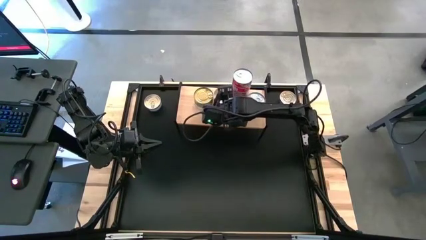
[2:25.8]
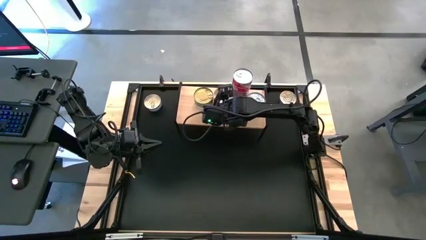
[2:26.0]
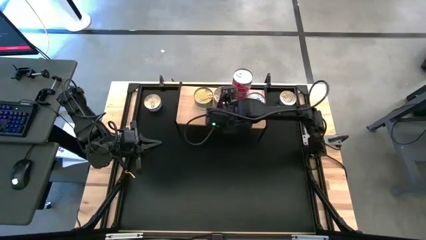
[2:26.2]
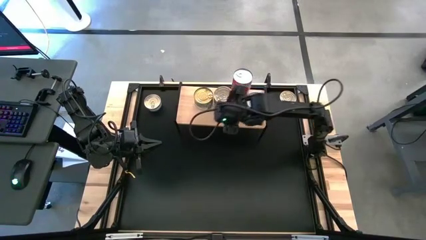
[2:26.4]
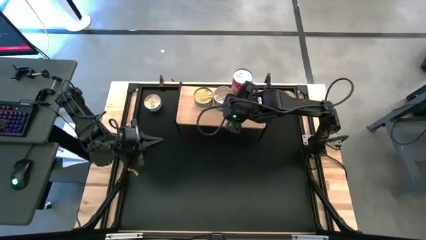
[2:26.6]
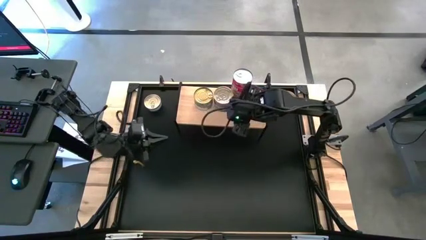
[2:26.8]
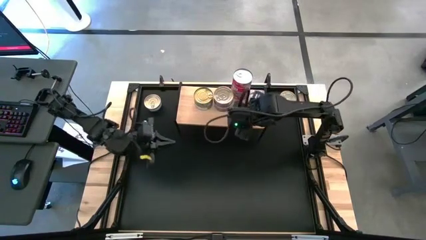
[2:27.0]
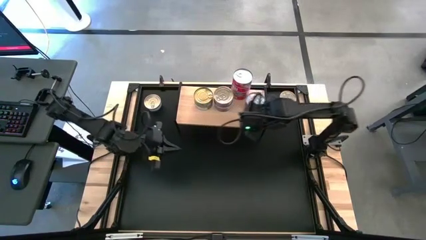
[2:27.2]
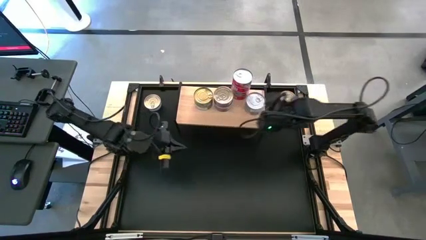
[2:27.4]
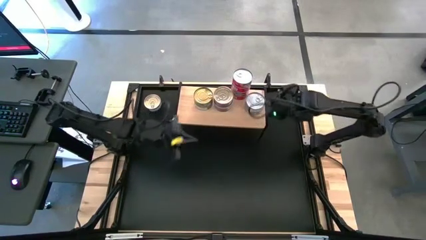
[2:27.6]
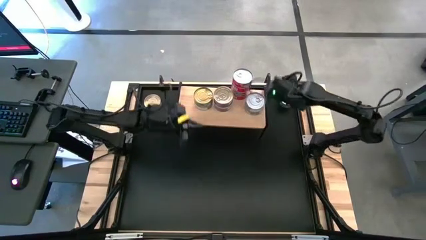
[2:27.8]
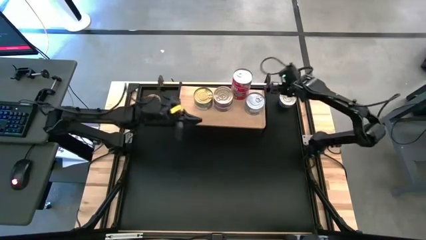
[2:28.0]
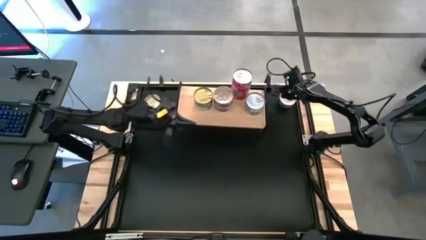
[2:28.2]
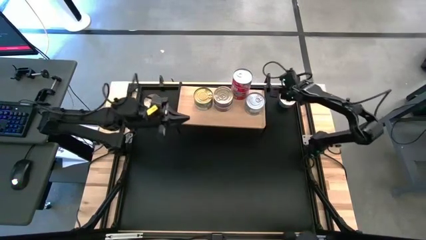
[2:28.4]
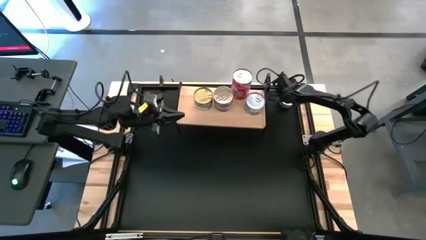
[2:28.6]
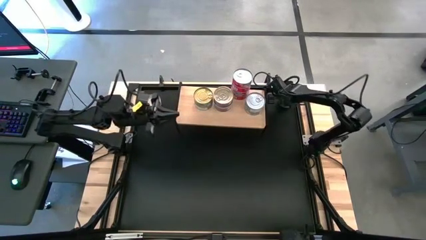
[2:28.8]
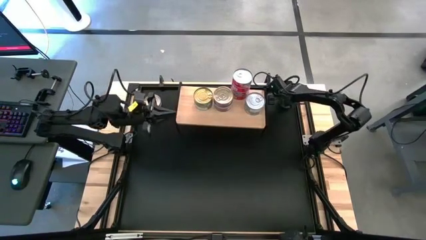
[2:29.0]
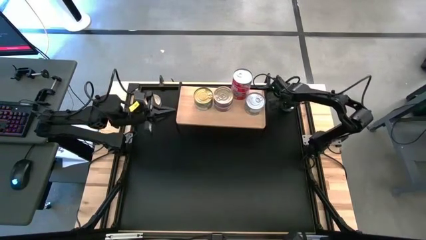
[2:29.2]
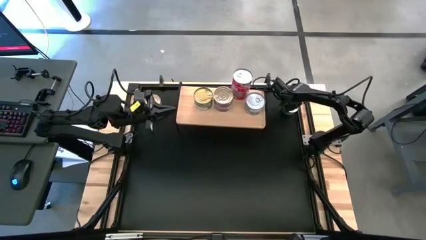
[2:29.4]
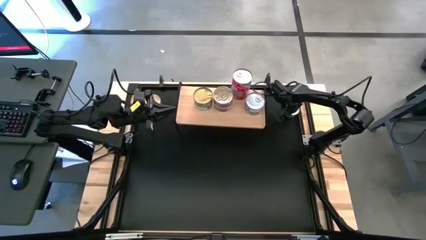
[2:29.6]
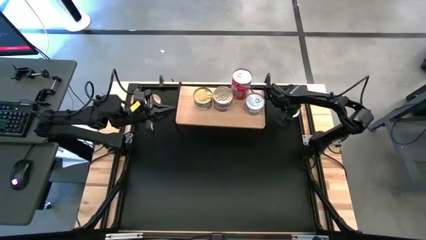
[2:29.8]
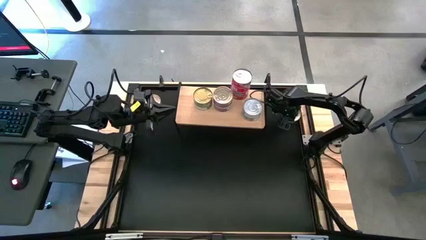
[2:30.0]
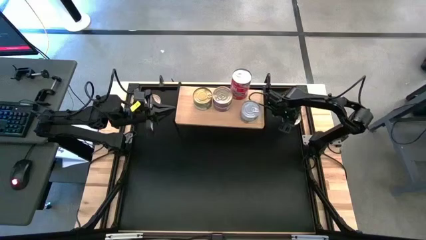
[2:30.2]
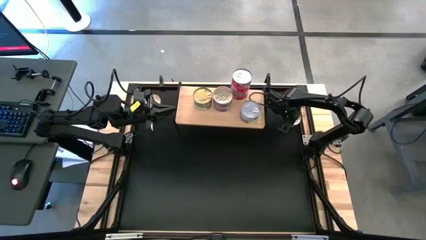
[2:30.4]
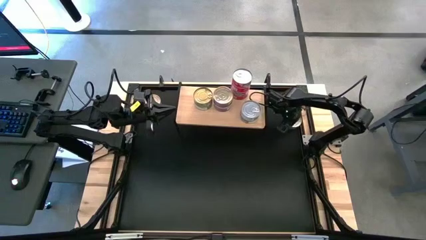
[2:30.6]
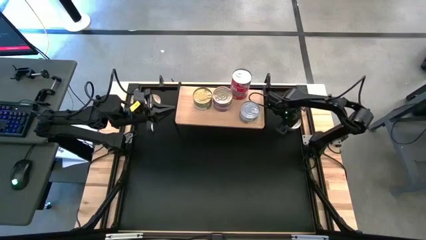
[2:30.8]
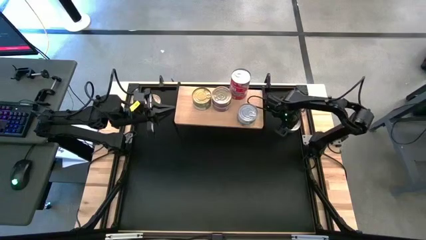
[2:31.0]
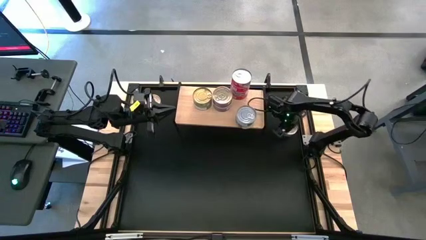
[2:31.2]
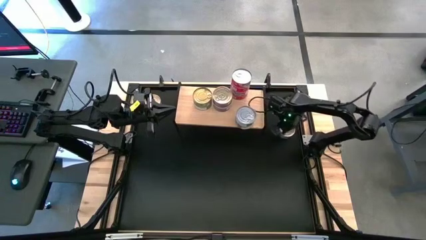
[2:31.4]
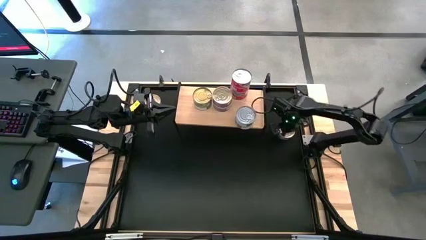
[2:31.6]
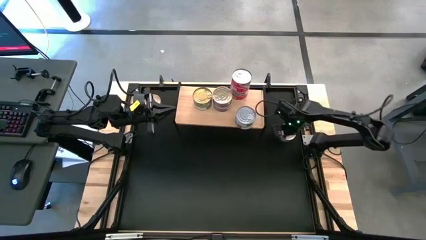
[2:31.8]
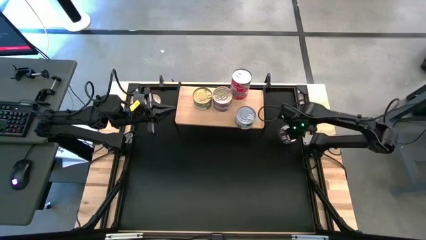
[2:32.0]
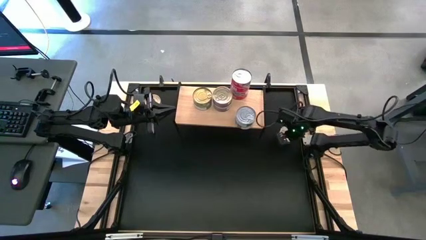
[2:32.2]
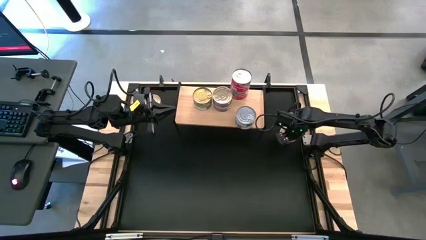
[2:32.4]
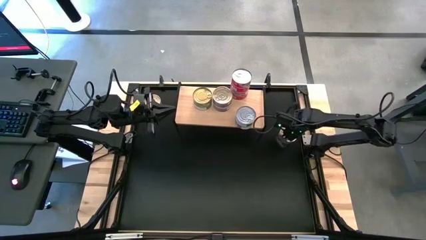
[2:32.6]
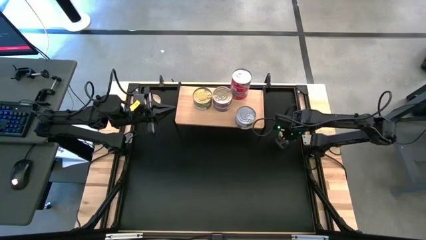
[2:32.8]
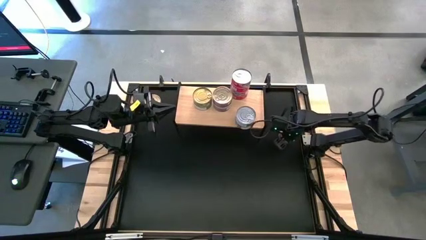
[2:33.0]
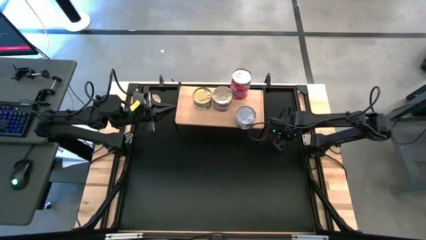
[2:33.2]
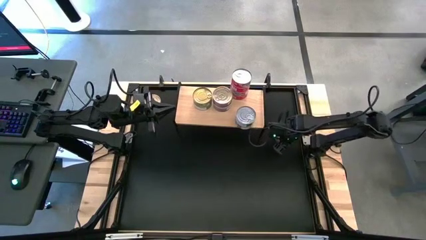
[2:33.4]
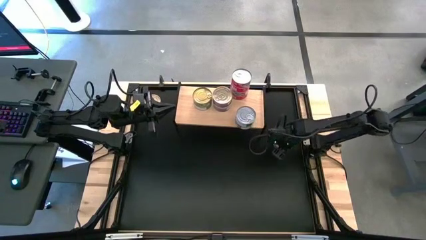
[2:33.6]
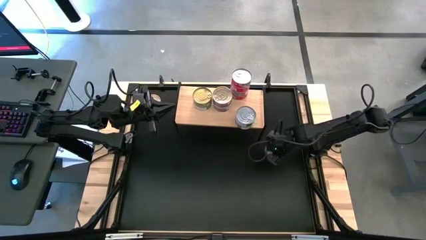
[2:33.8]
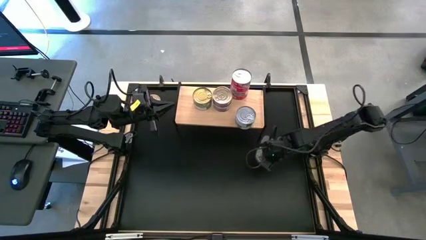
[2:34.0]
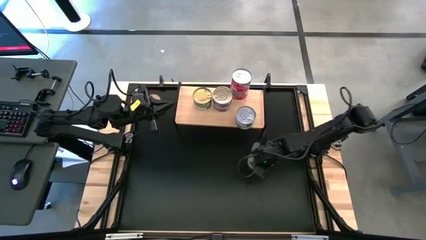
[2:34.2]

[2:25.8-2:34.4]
Task: Stack canned seafood by type on shelf
Move the blue tuna can to the middle right of the table

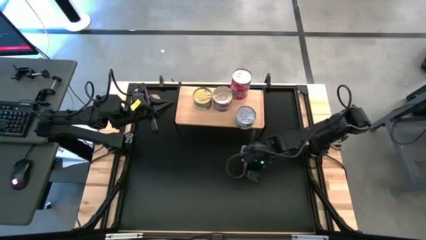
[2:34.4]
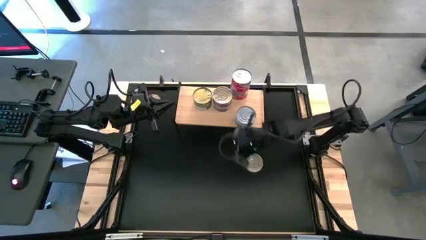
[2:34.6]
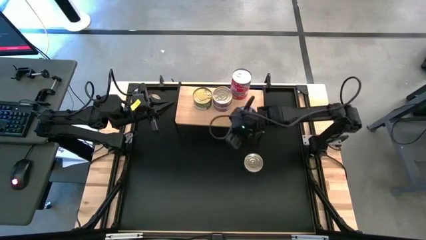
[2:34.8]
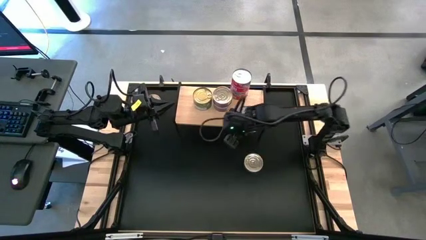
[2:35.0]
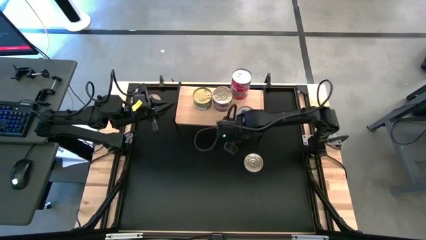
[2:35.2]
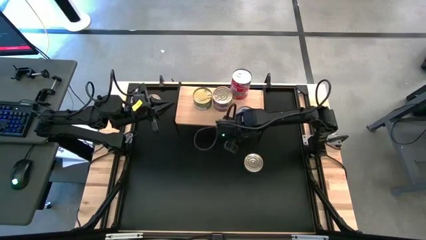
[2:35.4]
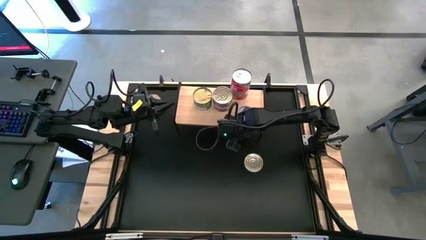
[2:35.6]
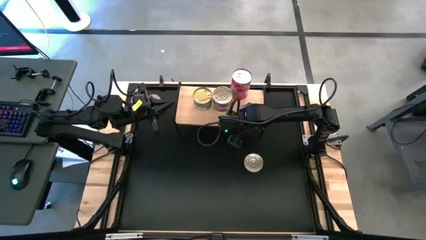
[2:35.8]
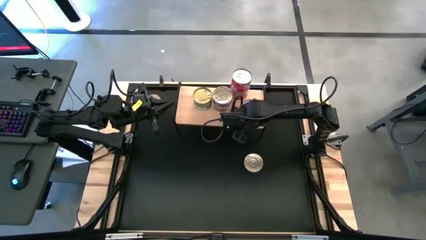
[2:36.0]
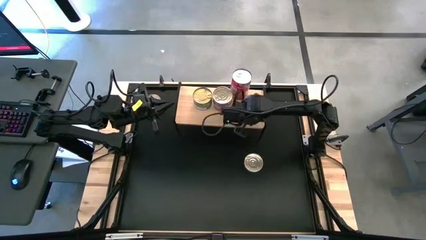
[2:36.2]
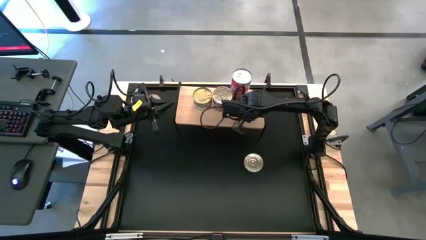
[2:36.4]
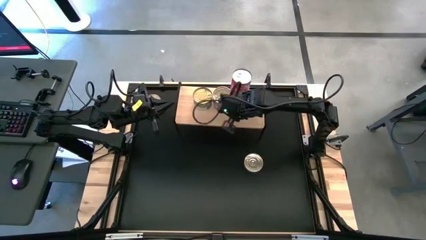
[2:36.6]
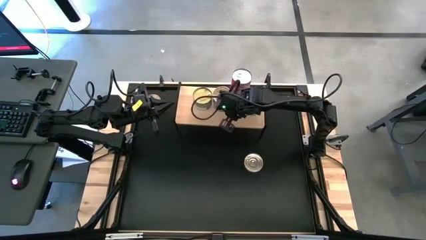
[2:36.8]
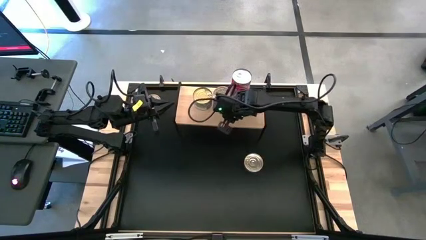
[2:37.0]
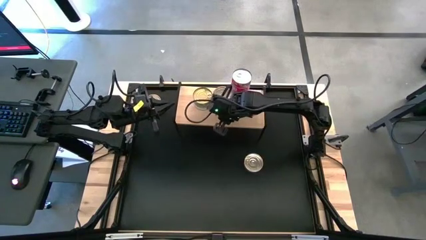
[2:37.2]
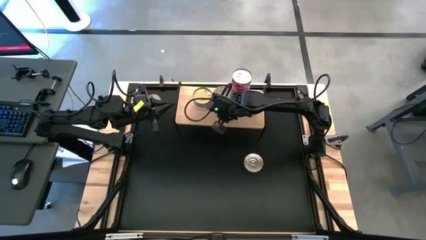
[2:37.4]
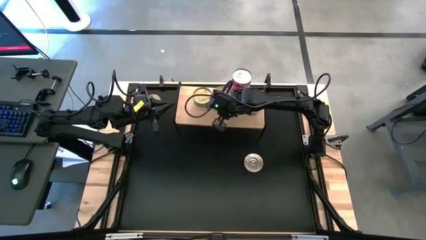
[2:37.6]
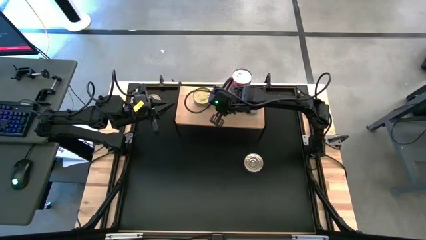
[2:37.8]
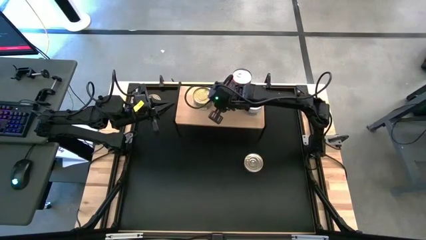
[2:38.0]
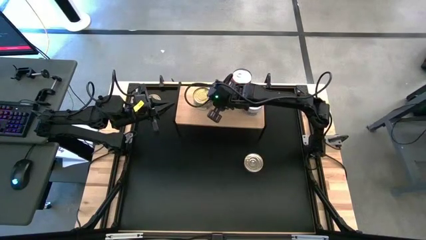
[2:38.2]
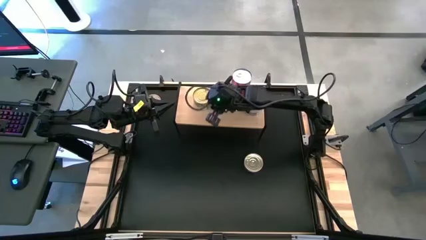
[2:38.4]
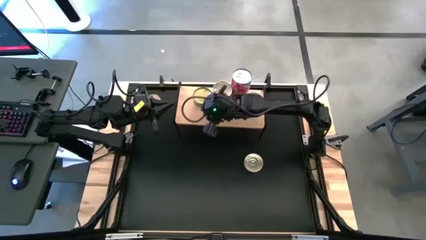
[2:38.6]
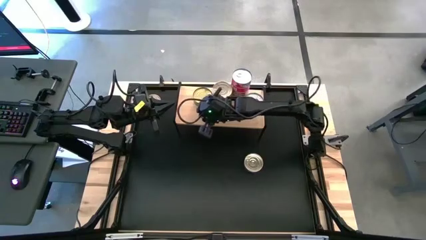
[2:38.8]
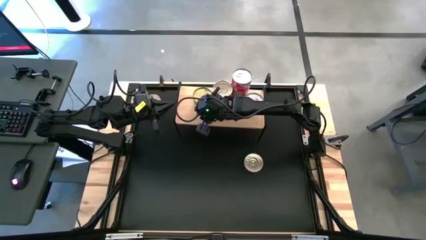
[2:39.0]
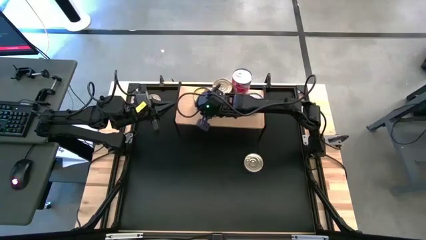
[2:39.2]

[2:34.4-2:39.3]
Adjust the stacked tuna cans on the shelf
